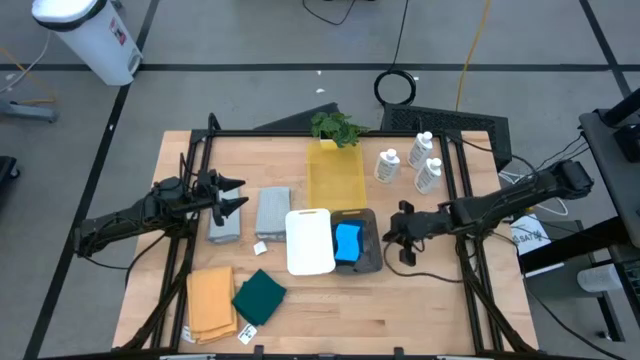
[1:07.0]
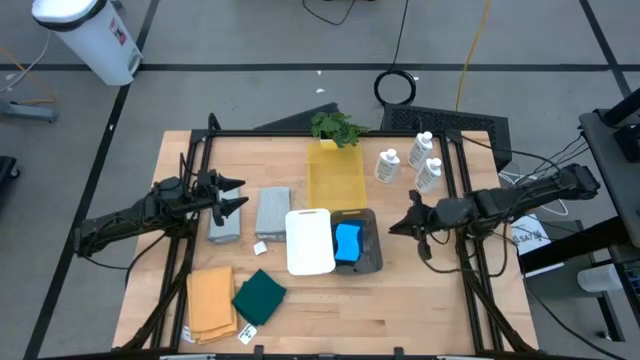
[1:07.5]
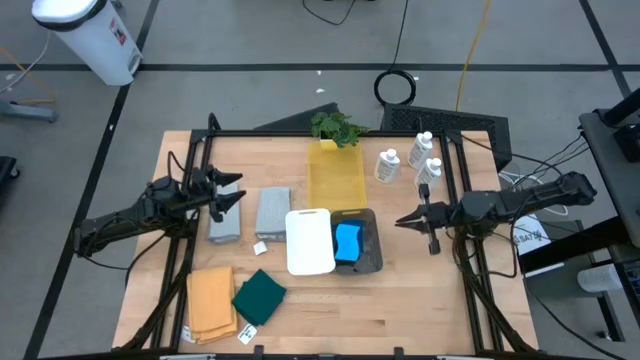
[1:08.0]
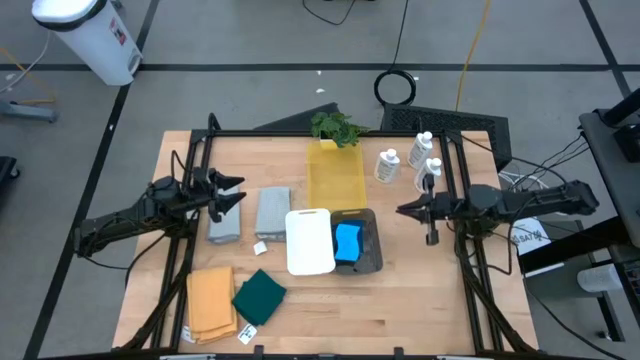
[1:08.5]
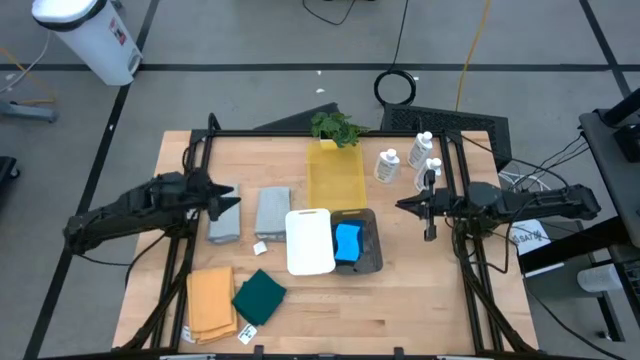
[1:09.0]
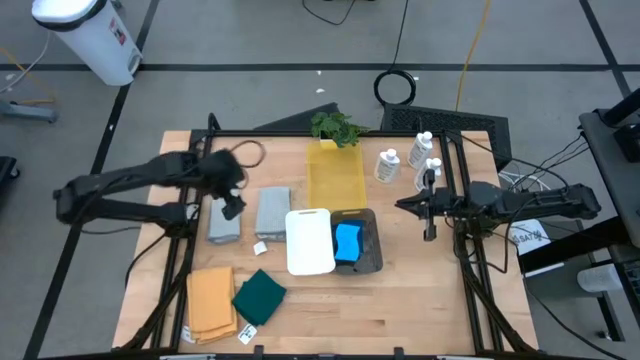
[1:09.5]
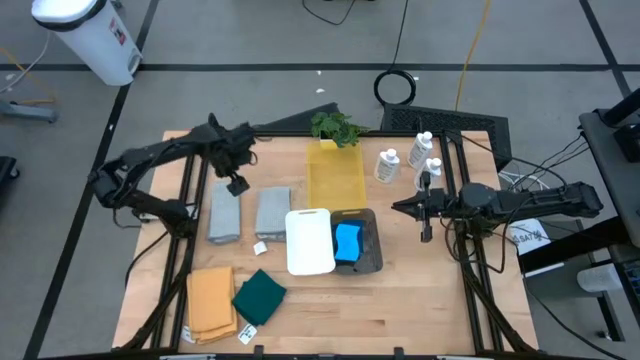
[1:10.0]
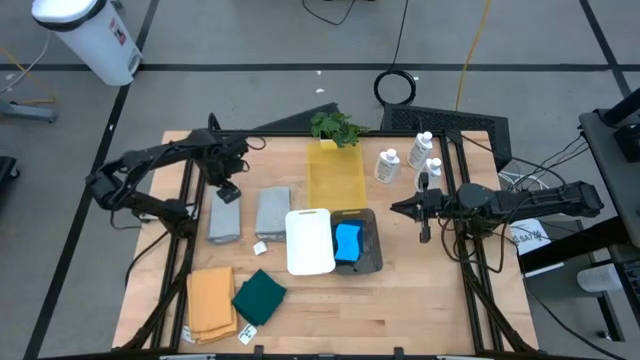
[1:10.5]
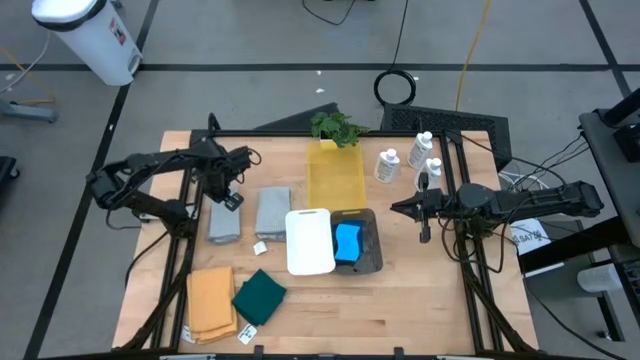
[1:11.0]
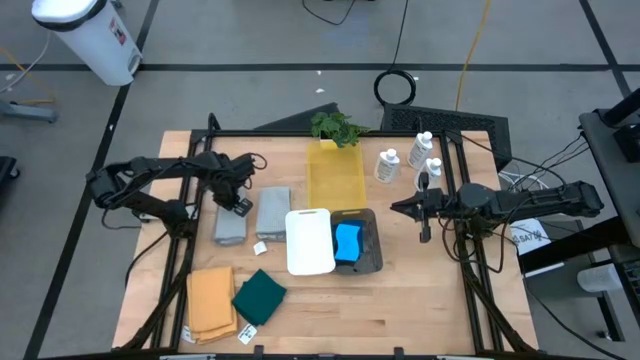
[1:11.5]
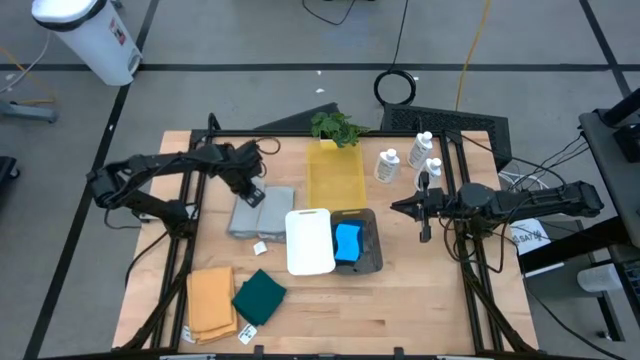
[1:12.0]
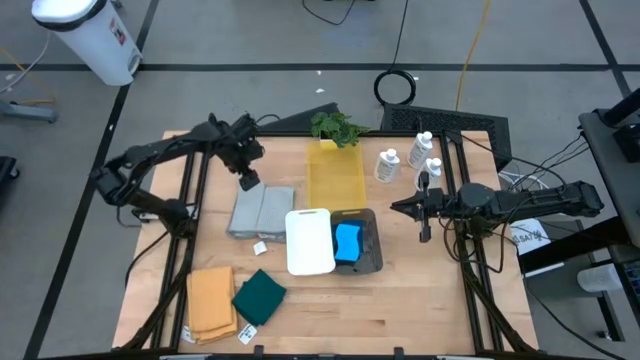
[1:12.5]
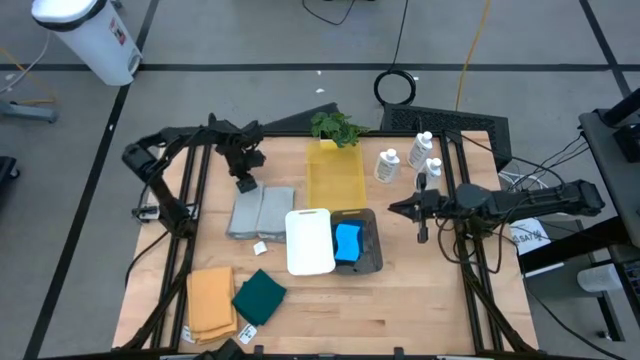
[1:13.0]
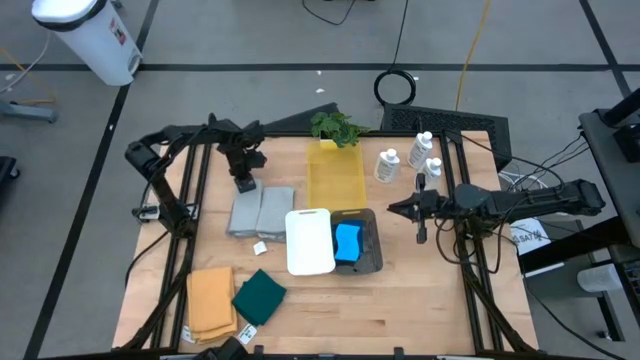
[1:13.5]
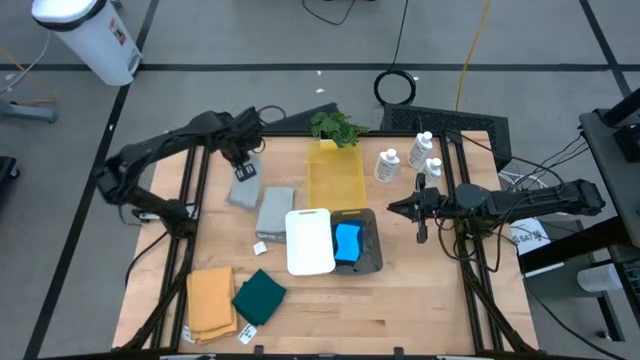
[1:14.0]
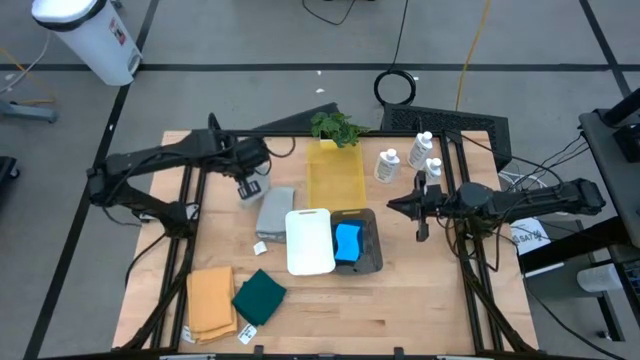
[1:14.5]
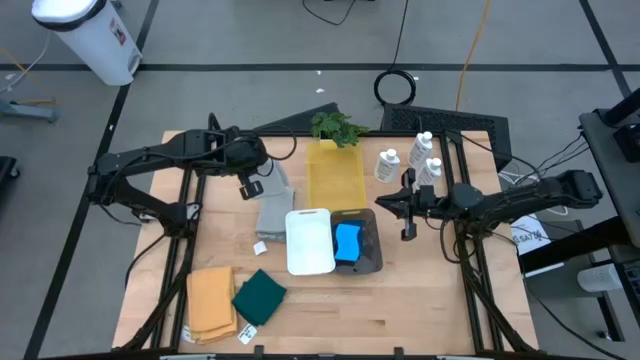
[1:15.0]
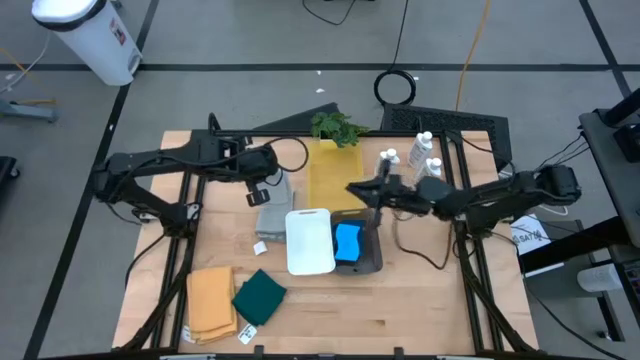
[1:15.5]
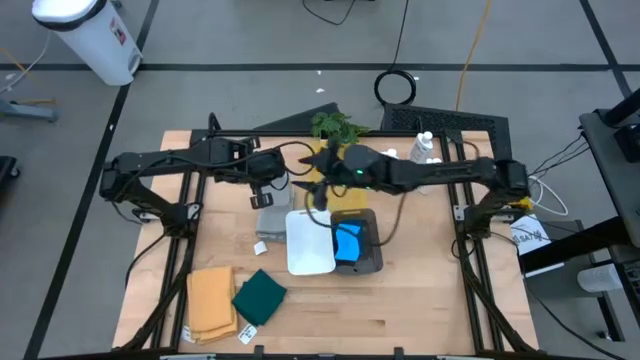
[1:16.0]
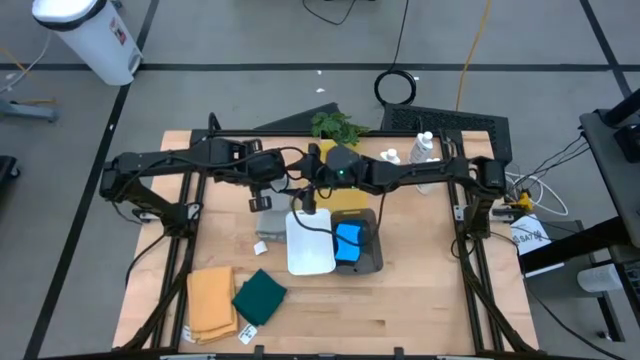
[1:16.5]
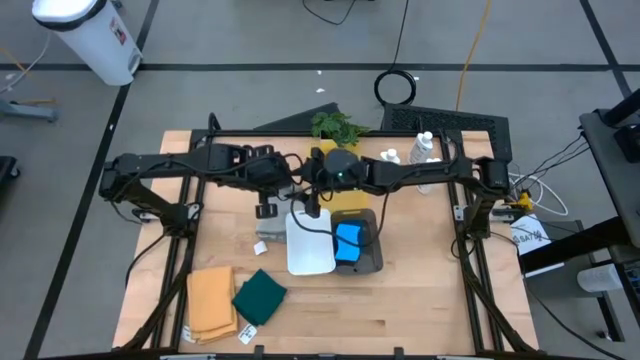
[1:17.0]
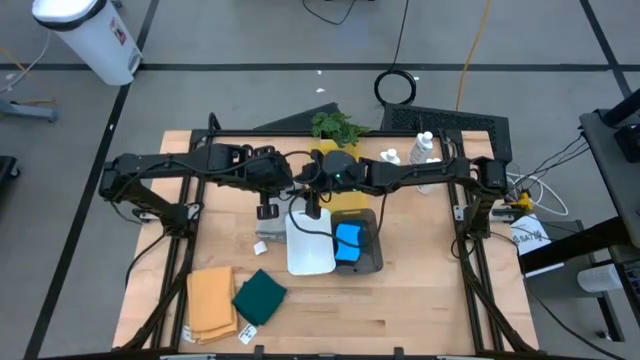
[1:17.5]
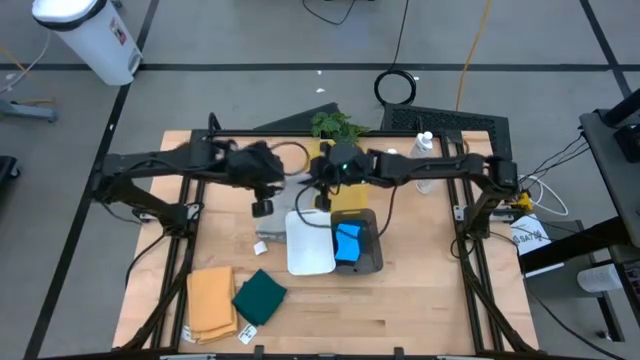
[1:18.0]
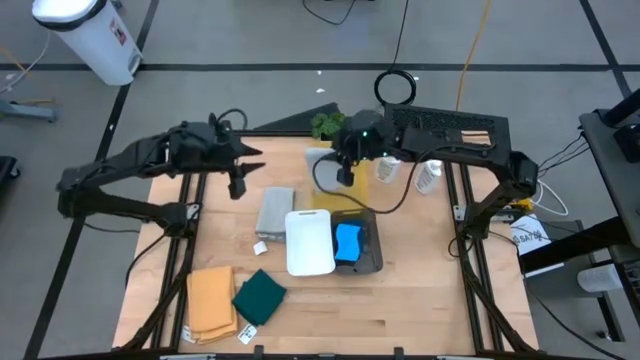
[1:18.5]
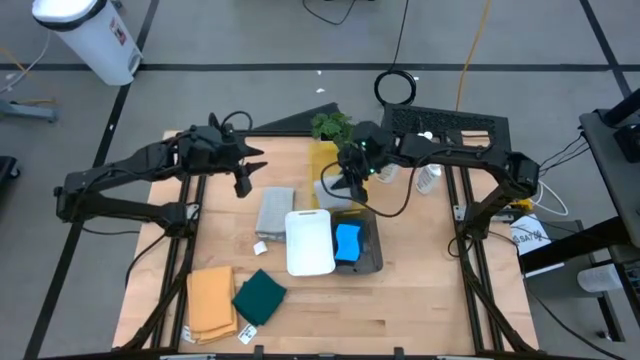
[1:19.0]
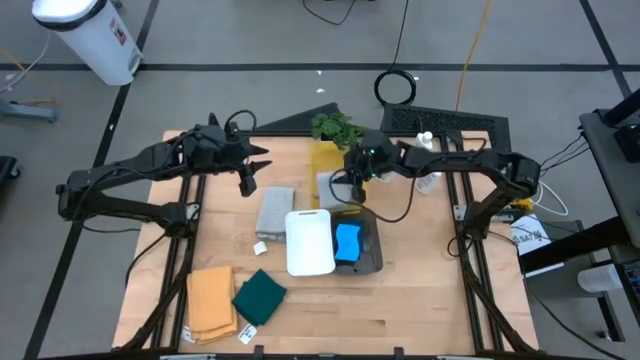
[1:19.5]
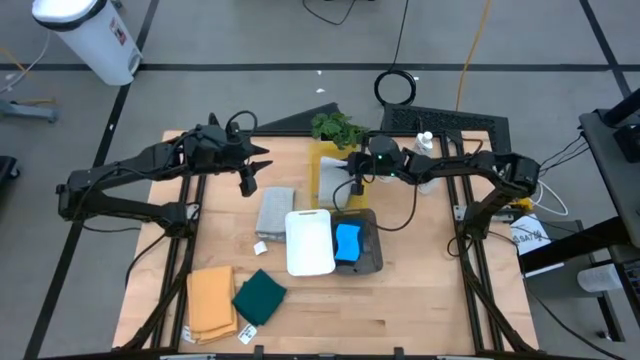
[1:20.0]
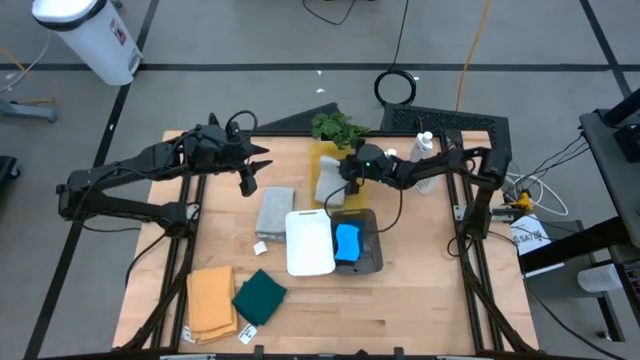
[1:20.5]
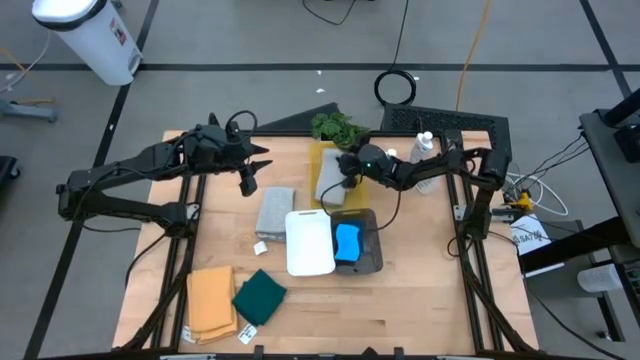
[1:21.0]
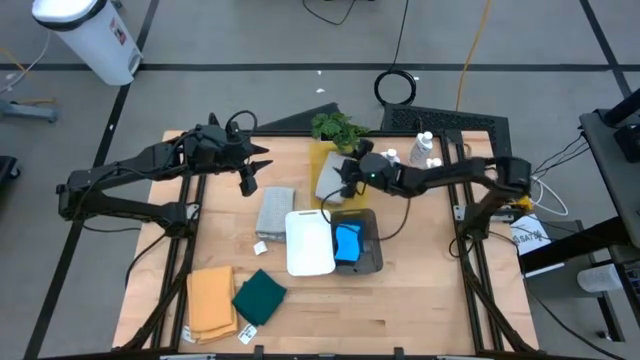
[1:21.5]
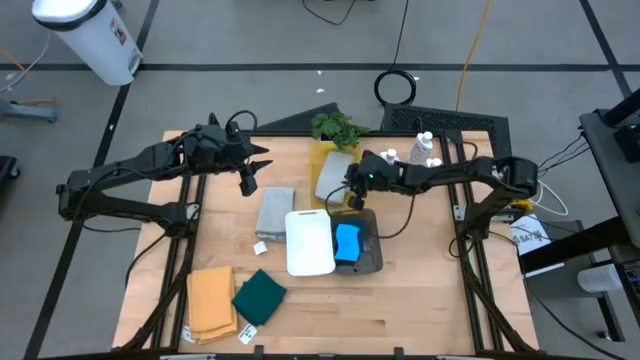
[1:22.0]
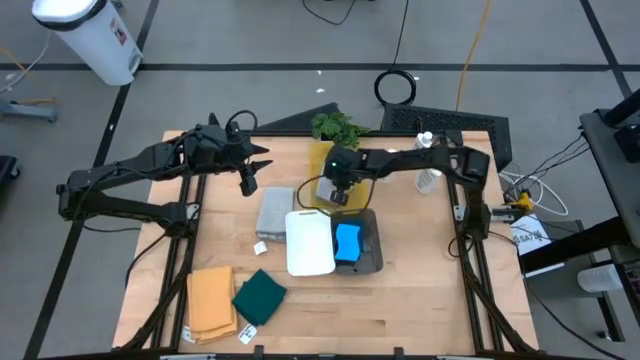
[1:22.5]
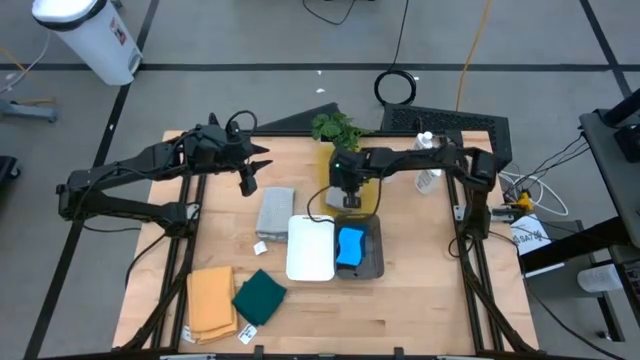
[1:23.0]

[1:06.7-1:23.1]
Task: Pick & Place Kitchen Items
Put the left gray microfiber into the yellow bin

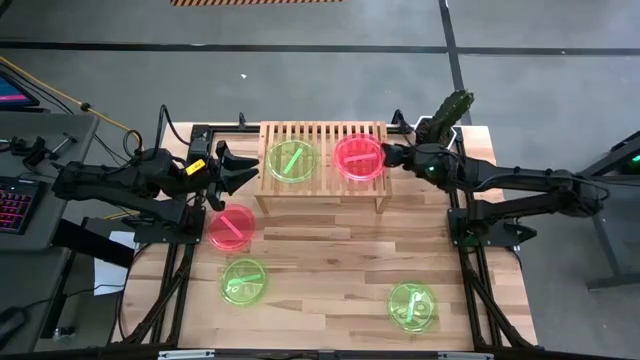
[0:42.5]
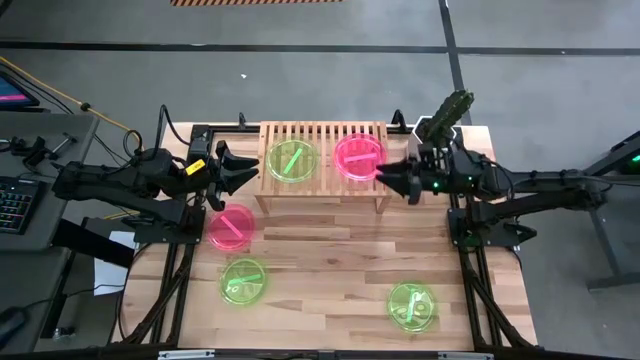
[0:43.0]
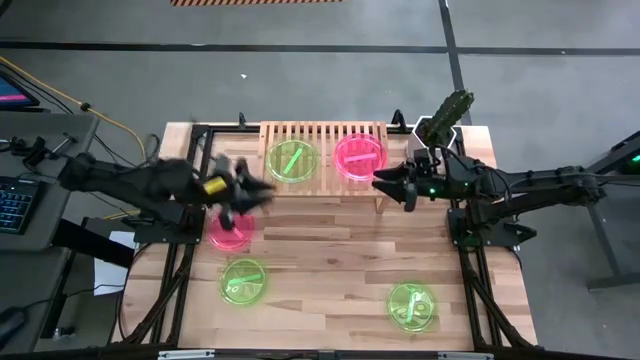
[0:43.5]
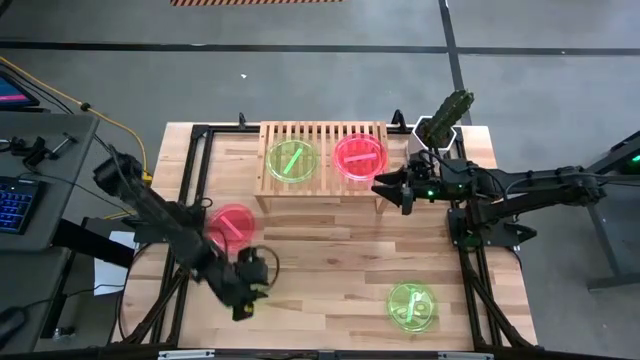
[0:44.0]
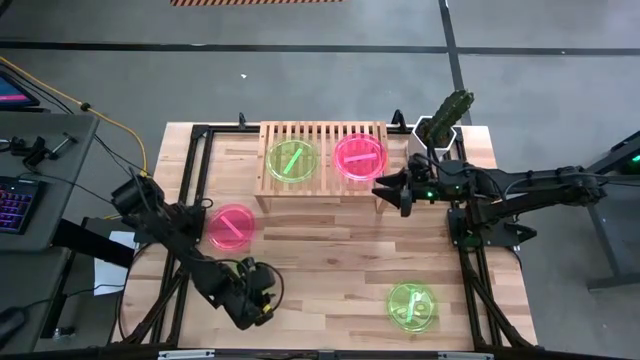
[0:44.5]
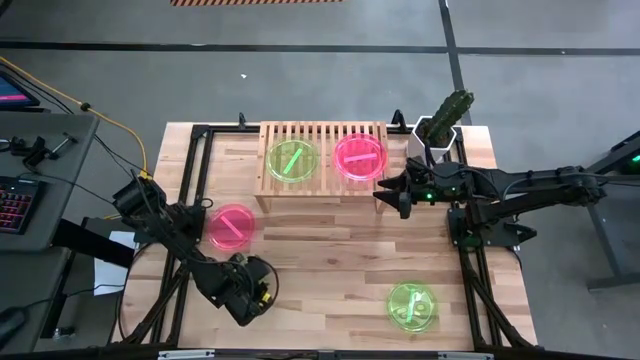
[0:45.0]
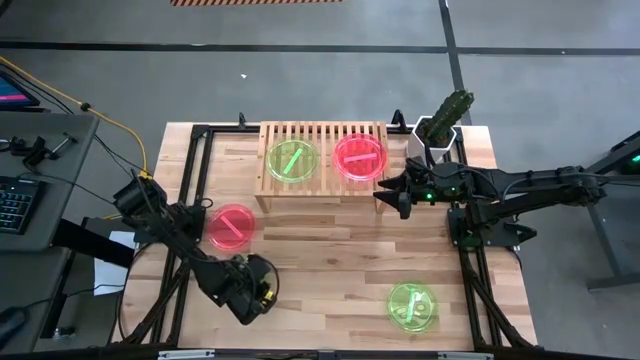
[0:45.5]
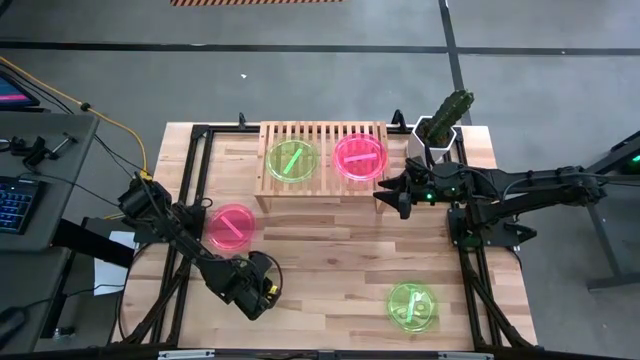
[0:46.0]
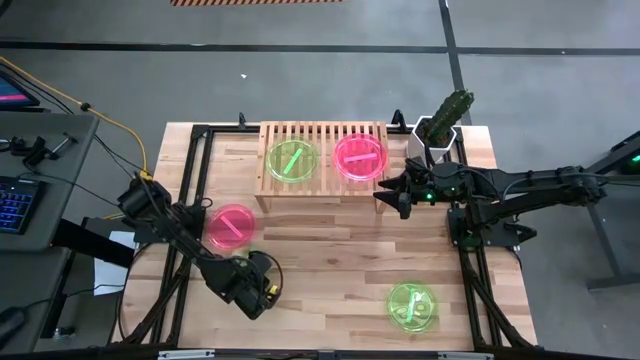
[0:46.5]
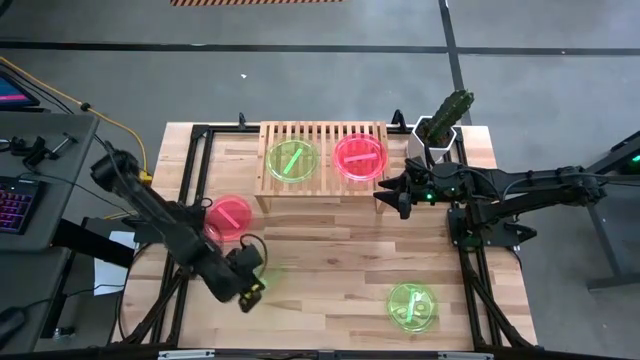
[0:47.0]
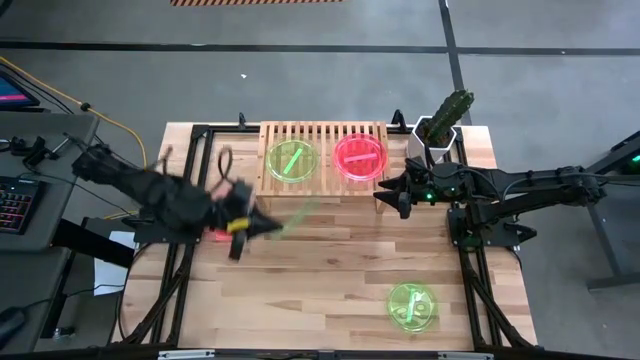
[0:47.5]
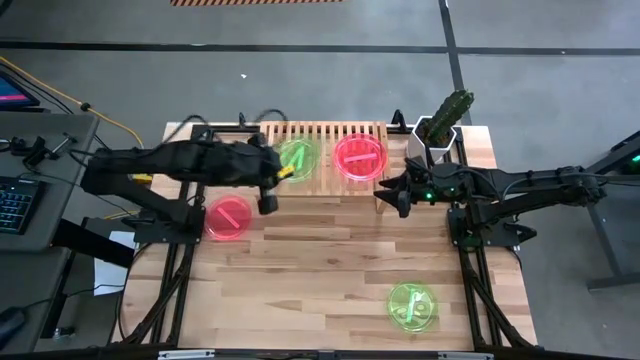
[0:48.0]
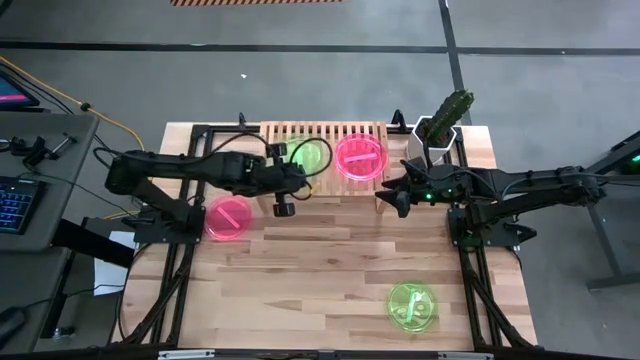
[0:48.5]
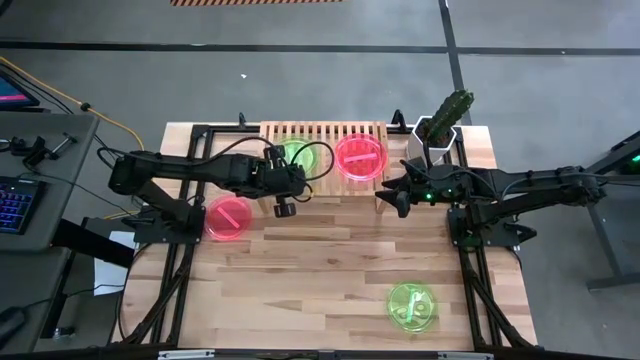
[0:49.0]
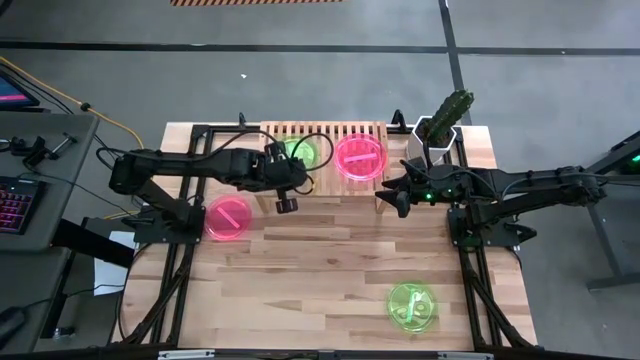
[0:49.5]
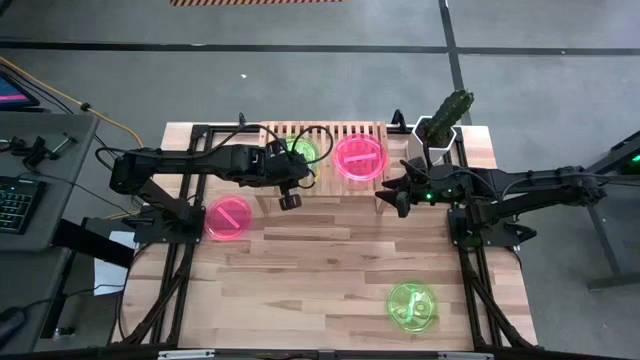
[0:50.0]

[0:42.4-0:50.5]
Task: Place and stack plates onto a shelf
Stack the left green transparent plate on top of the green transparent plate on the shelf
